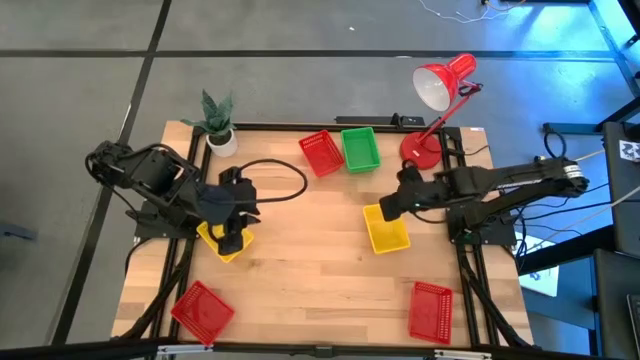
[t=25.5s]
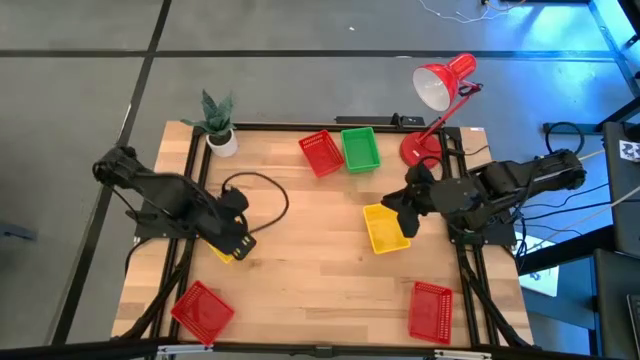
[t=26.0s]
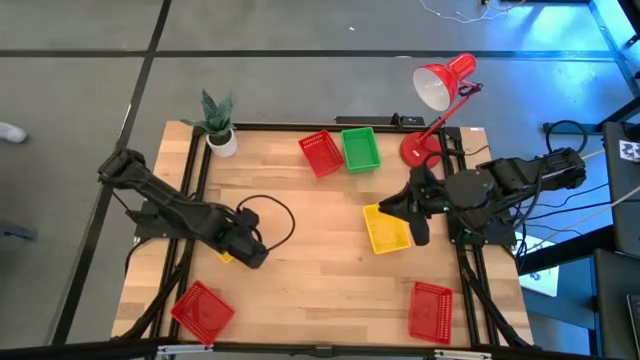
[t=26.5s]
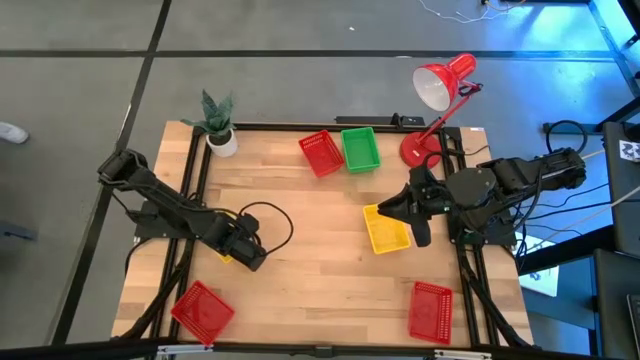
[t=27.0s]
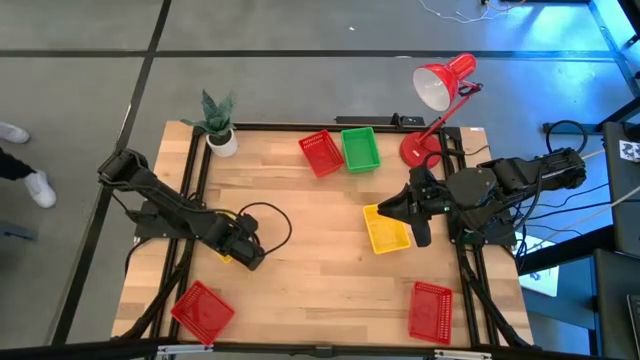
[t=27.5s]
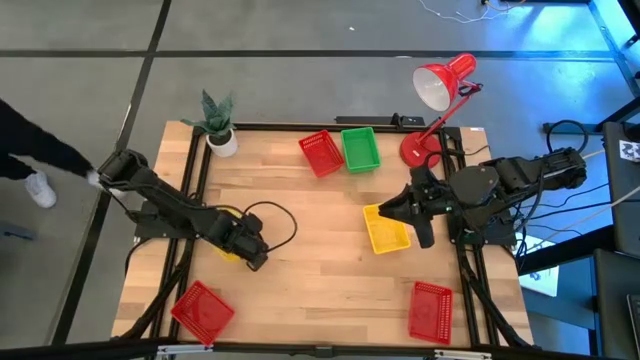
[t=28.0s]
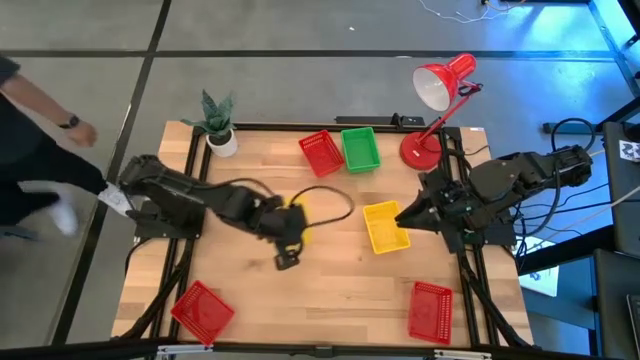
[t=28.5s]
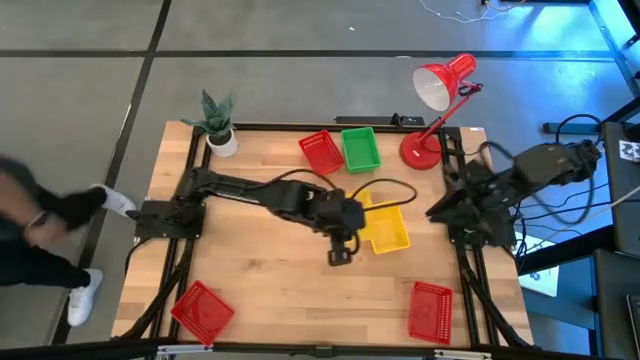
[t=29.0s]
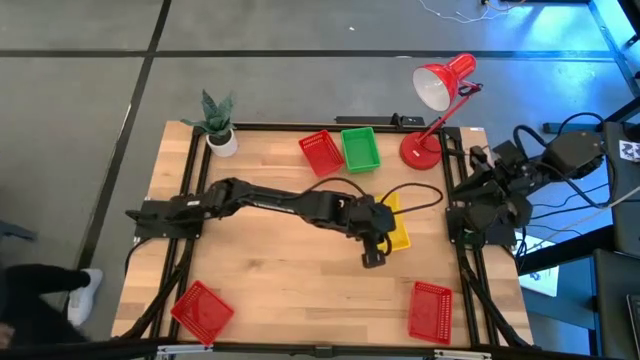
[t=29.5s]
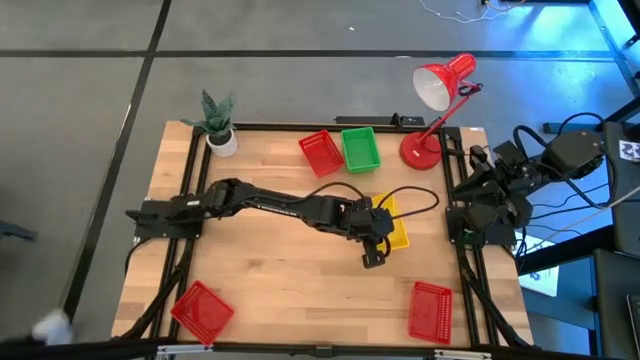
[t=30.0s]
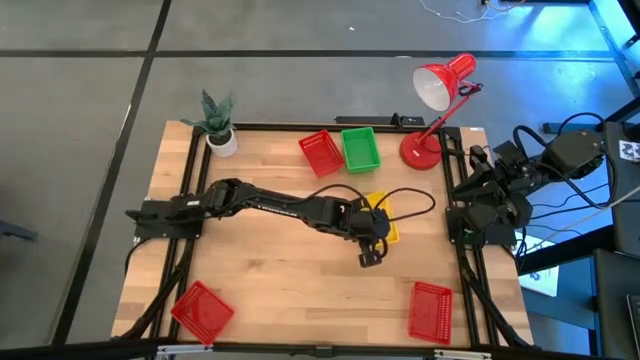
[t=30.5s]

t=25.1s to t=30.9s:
Stack the left yellow bin on the right yellow bin

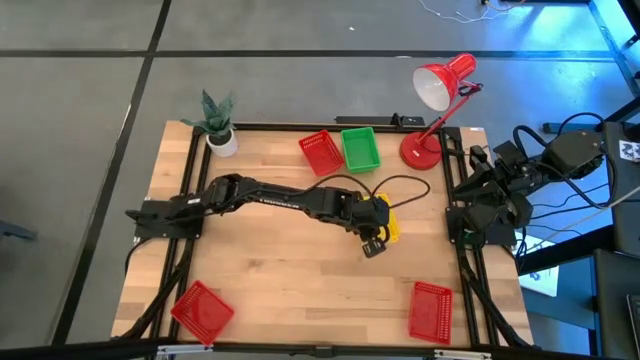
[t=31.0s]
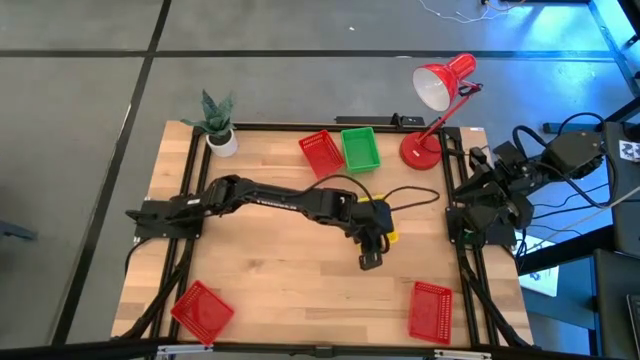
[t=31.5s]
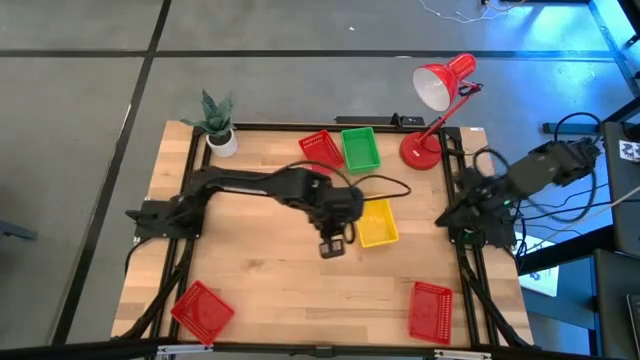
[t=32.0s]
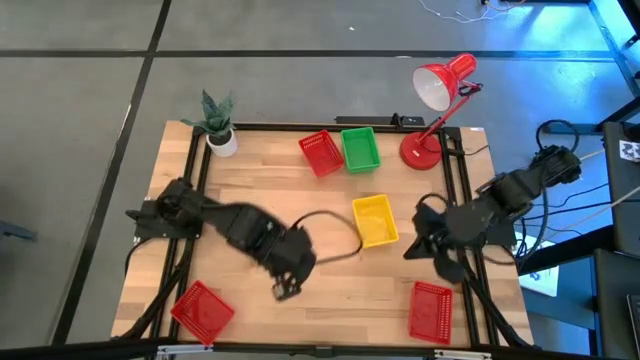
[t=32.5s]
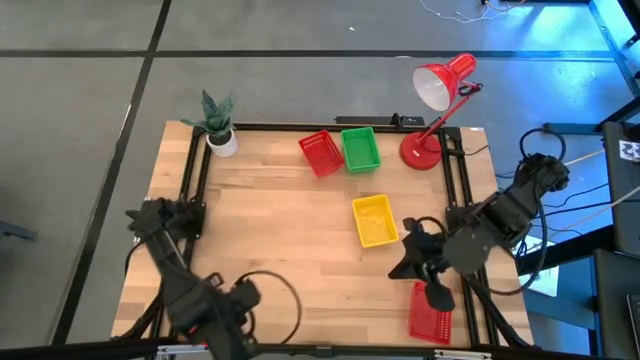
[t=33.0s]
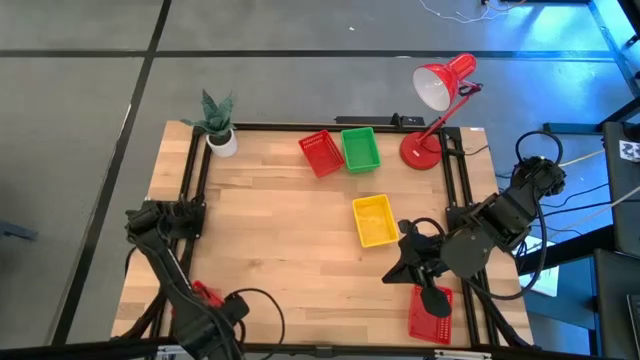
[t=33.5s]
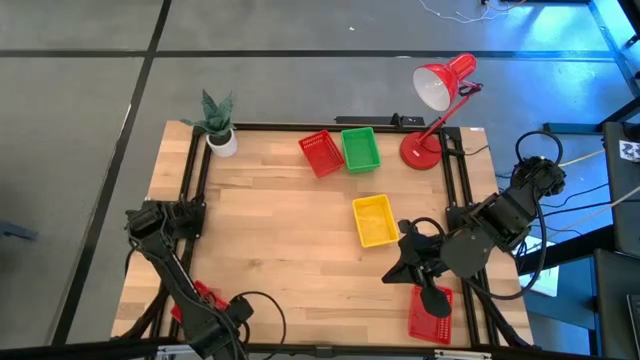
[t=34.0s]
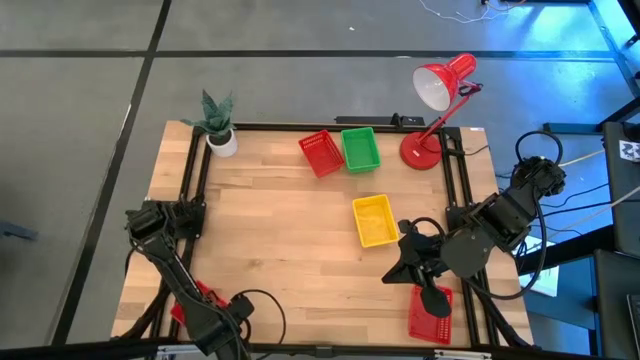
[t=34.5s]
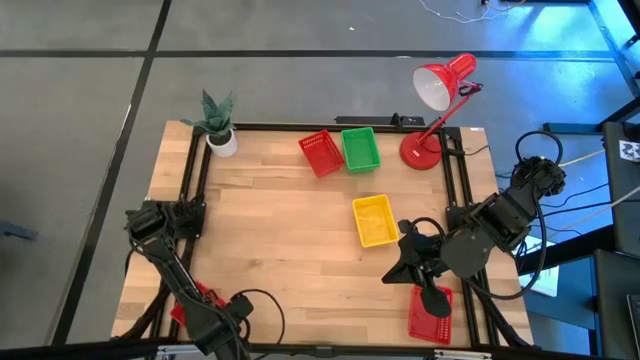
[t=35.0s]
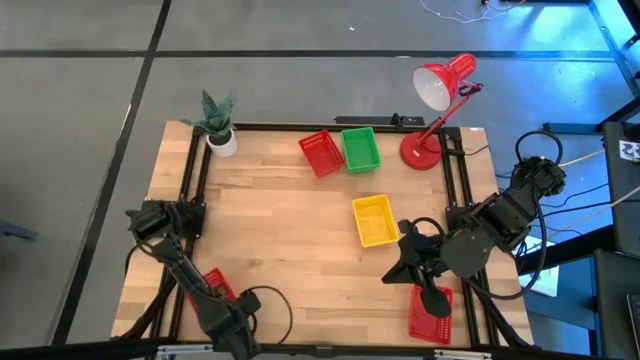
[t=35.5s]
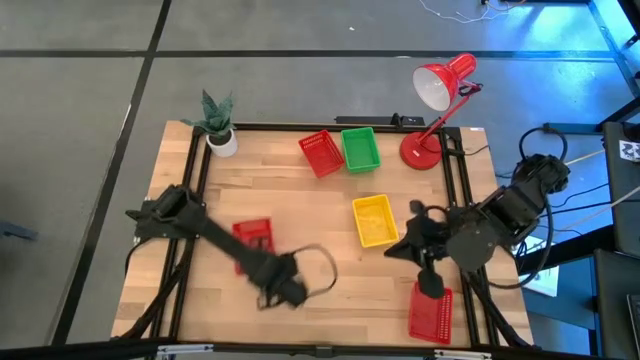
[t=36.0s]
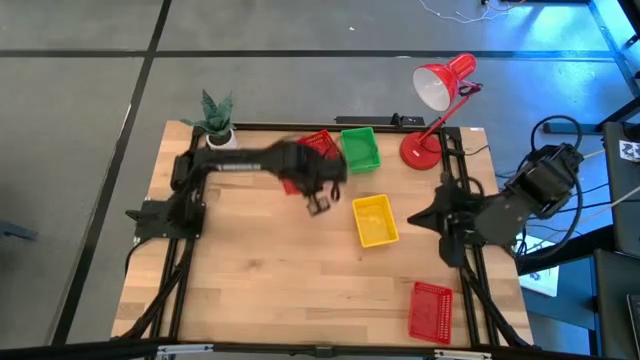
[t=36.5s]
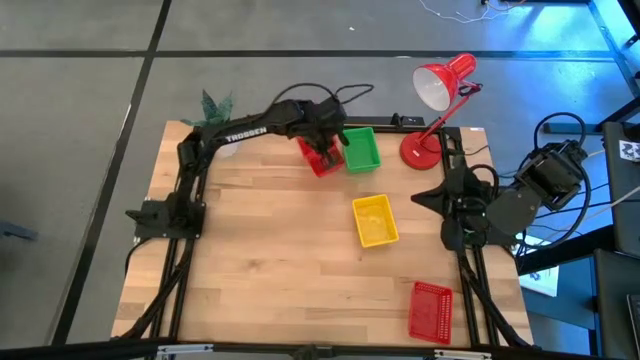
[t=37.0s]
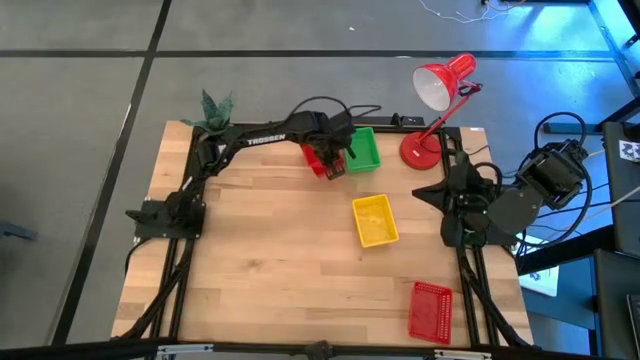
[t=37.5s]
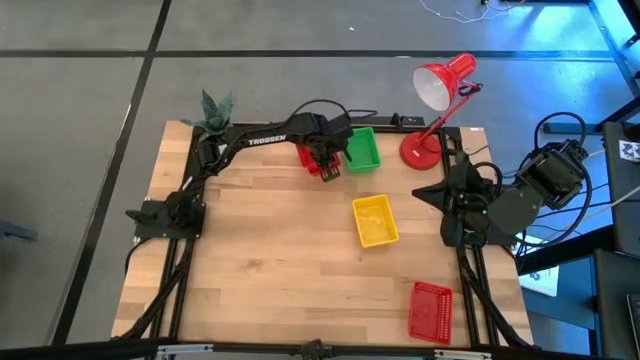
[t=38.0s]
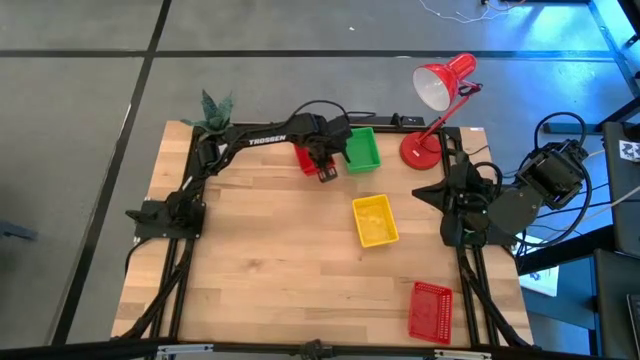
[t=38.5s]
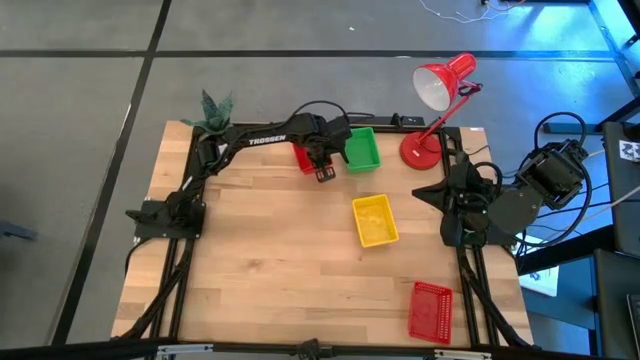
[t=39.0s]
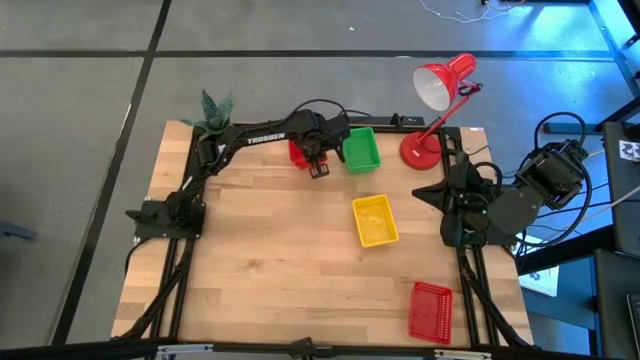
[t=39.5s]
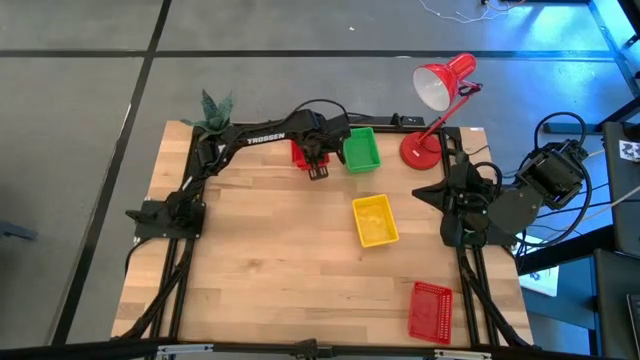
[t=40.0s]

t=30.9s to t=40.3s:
Stack the bottom left red bin on the top red bin
